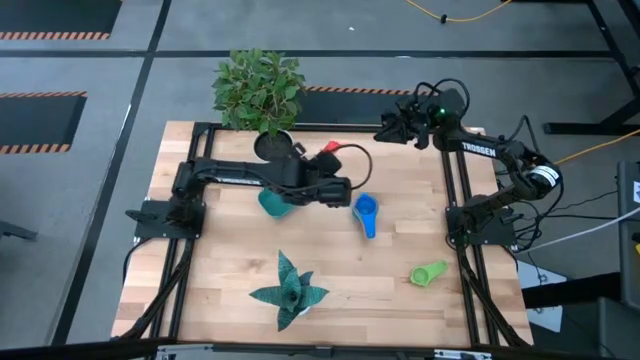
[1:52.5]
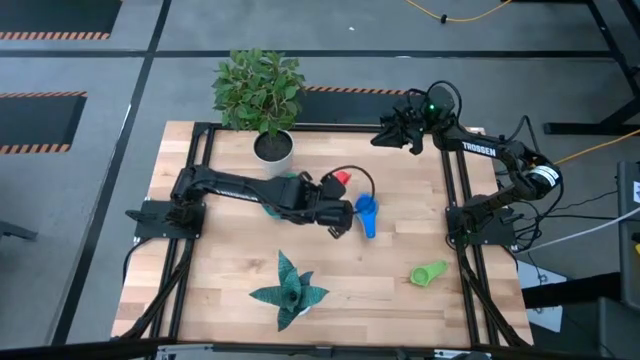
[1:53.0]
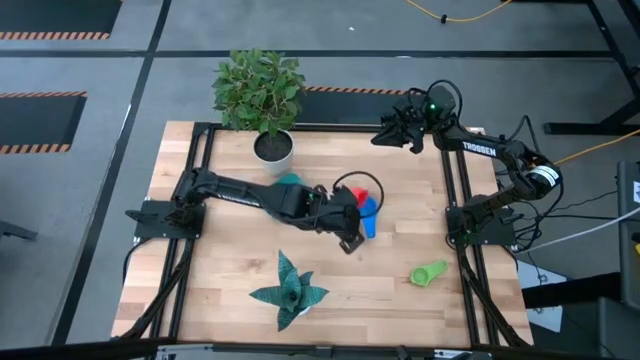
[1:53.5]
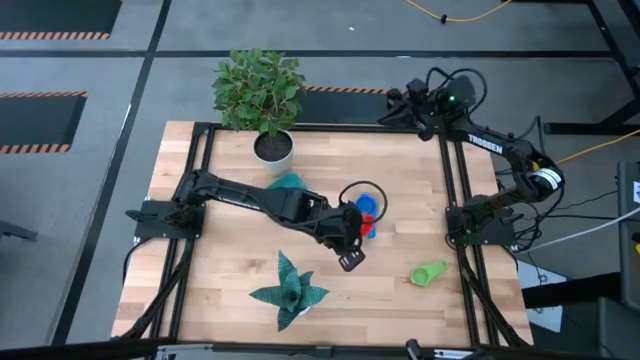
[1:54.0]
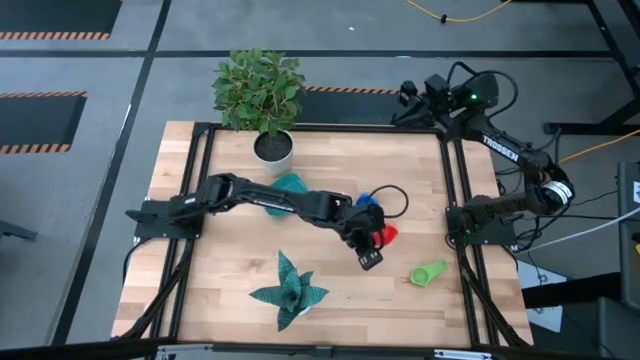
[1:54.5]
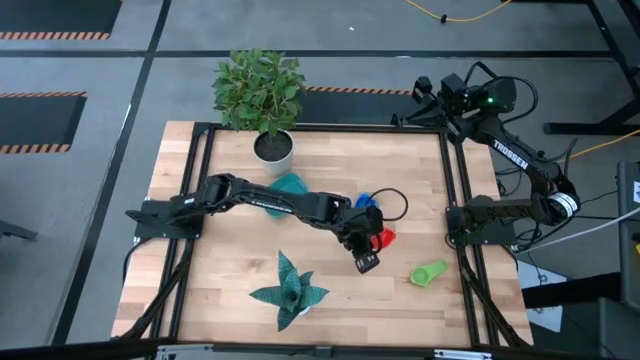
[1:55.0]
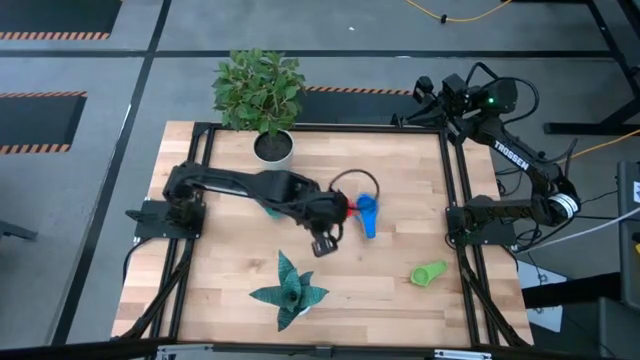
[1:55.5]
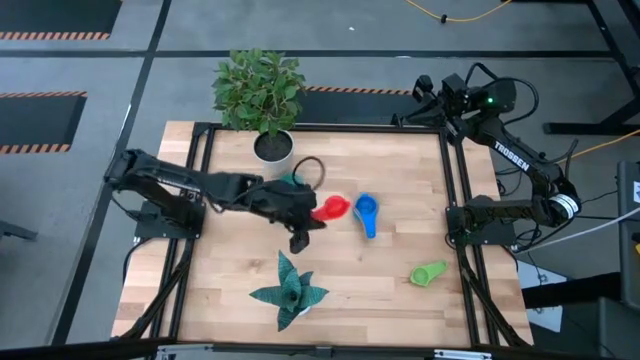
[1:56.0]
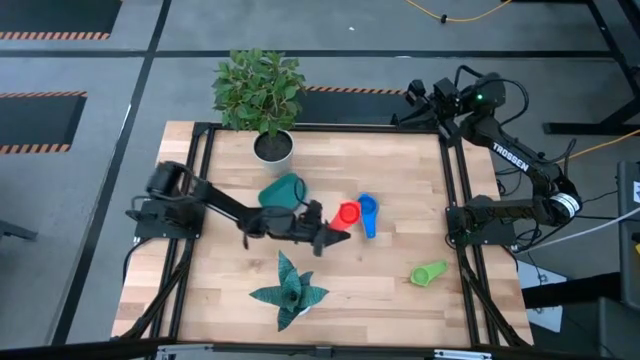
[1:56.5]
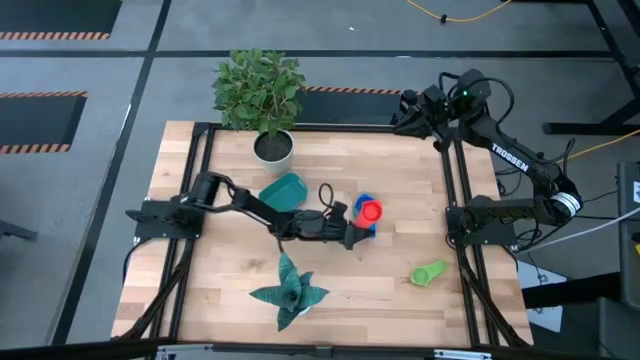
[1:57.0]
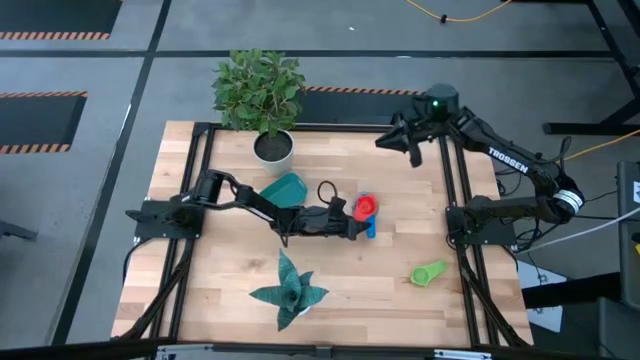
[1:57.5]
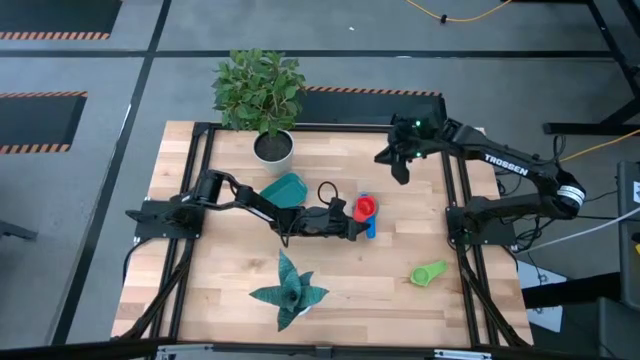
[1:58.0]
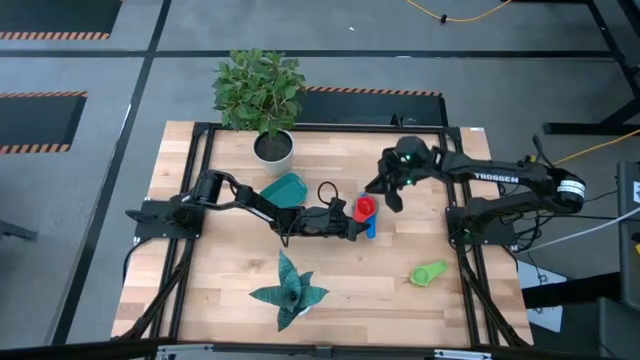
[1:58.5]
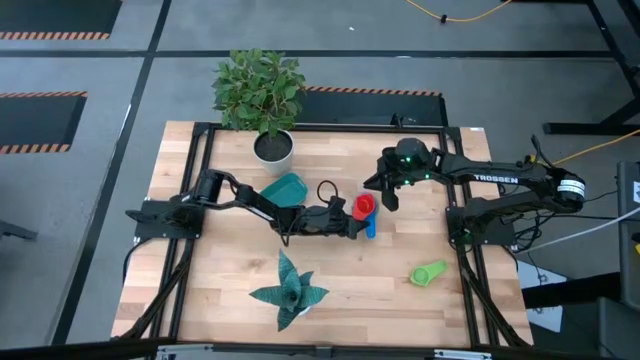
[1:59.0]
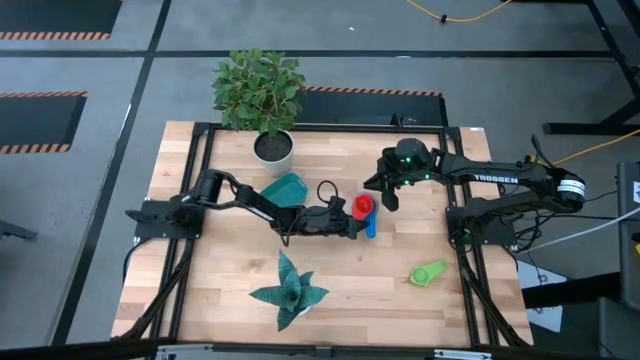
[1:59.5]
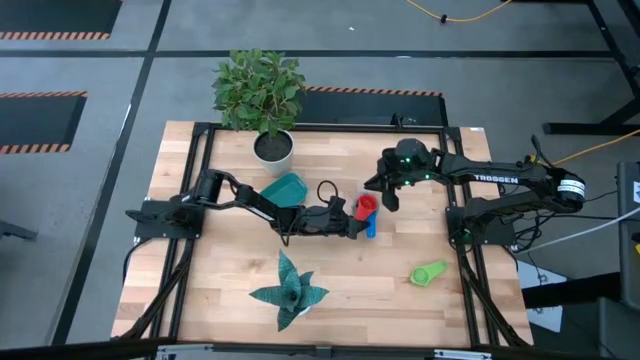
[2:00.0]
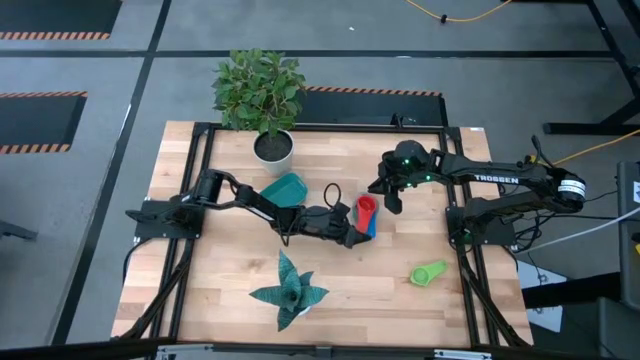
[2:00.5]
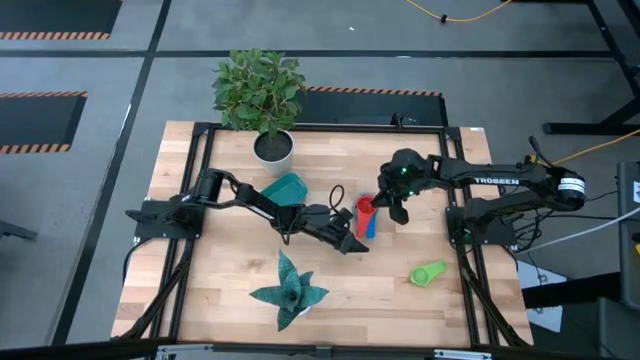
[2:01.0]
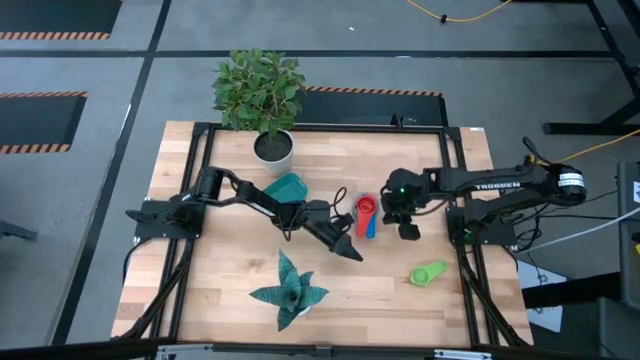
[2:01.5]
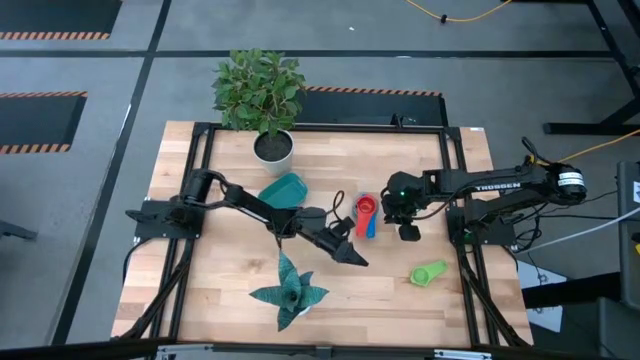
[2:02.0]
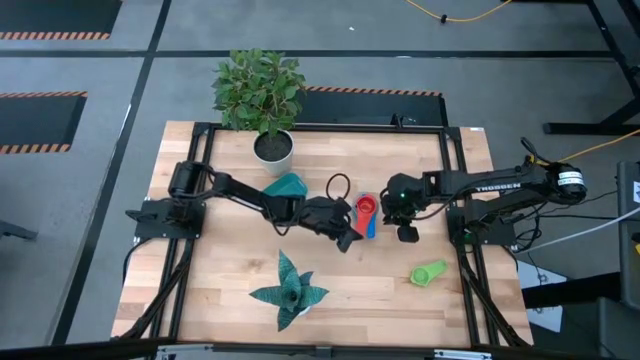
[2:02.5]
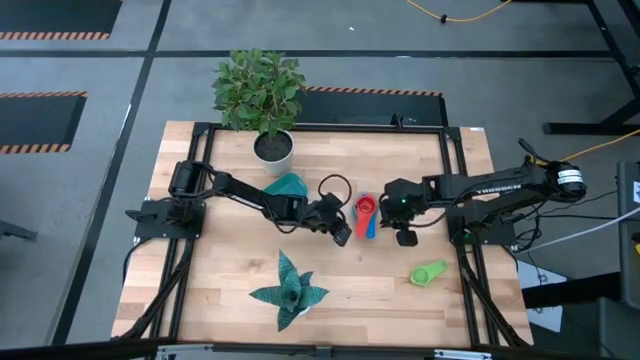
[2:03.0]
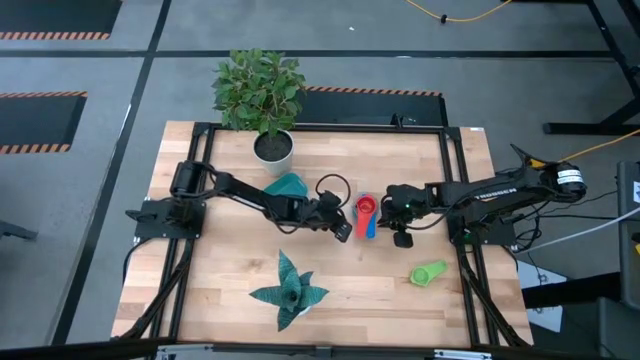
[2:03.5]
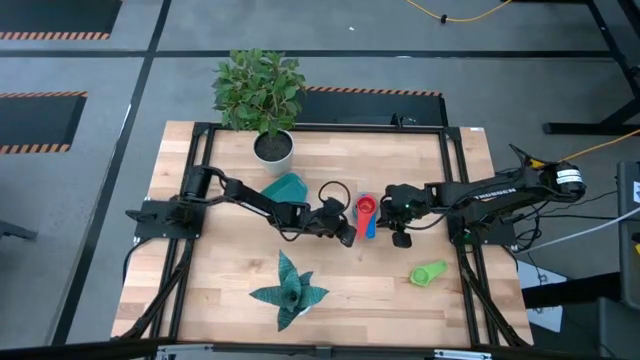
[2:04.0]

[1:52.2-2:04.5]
Task: Nest measuring cups in basket
Stack the red measuring cup on top of the blue measuring cup

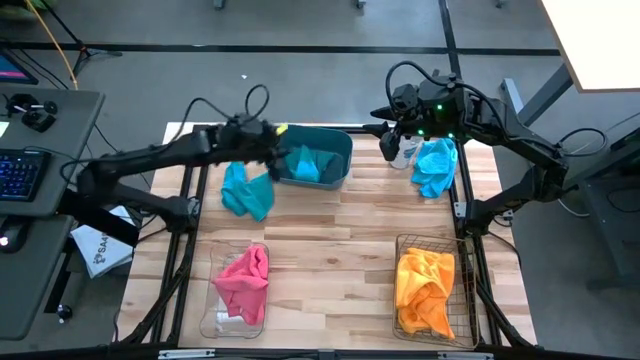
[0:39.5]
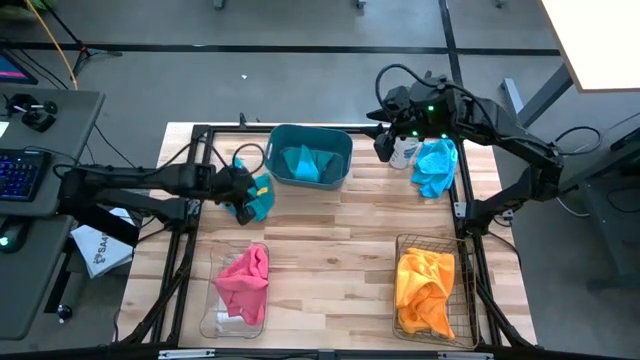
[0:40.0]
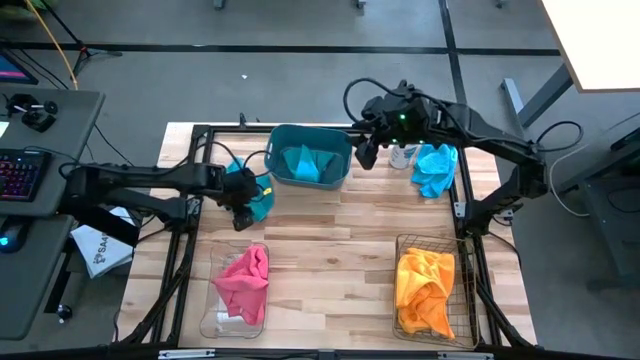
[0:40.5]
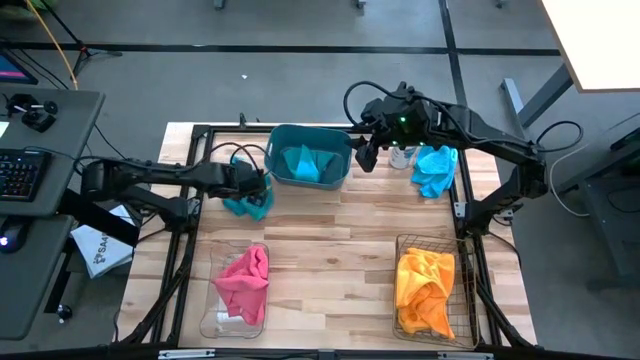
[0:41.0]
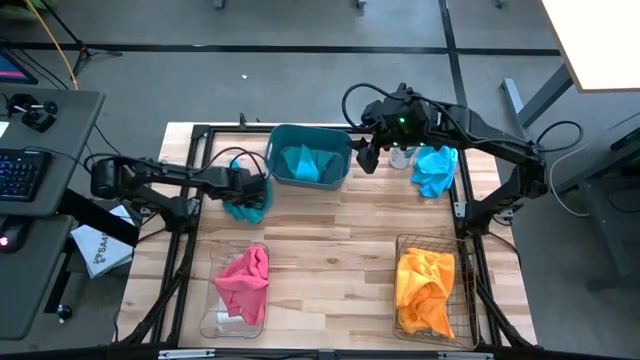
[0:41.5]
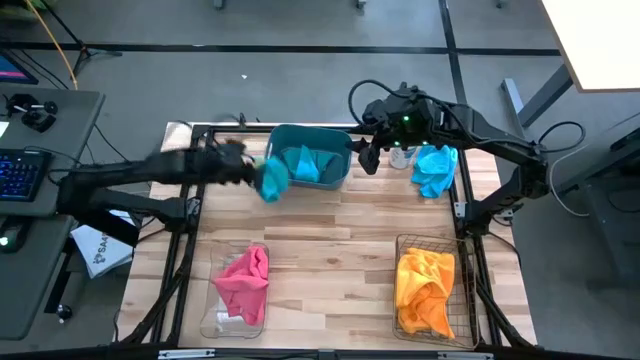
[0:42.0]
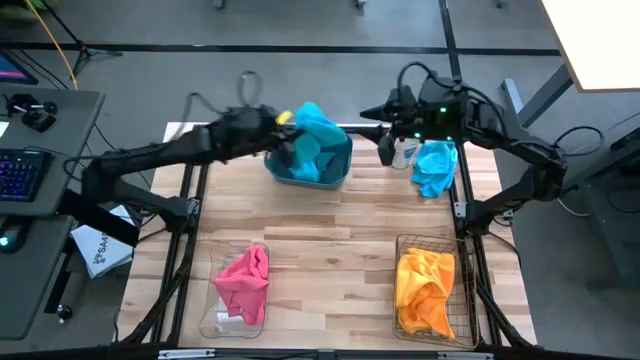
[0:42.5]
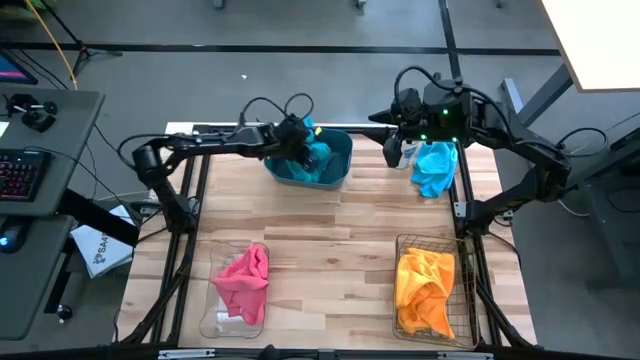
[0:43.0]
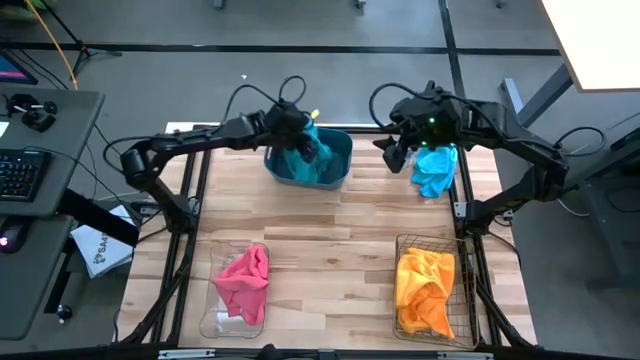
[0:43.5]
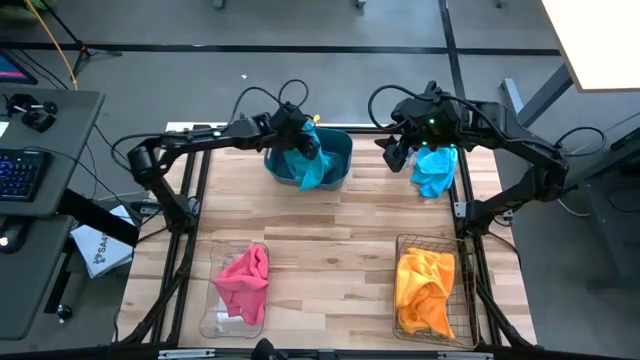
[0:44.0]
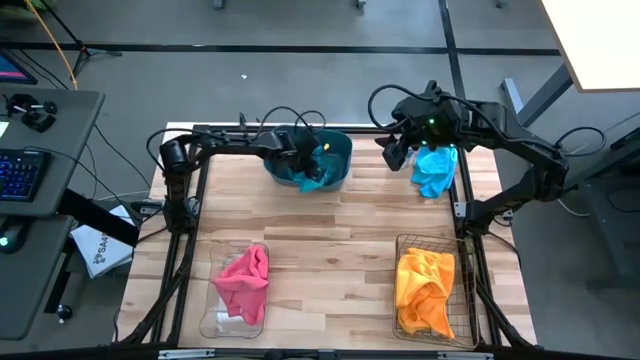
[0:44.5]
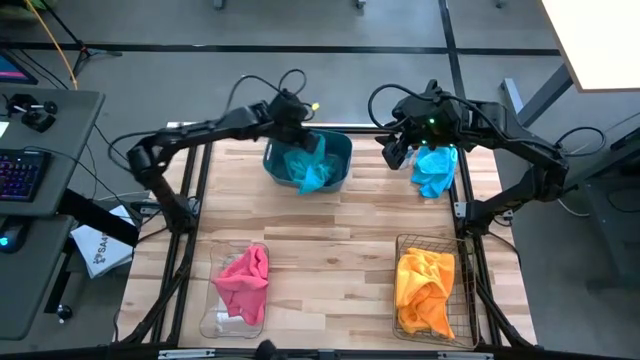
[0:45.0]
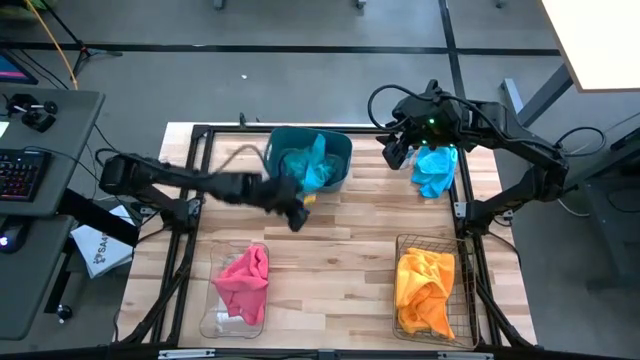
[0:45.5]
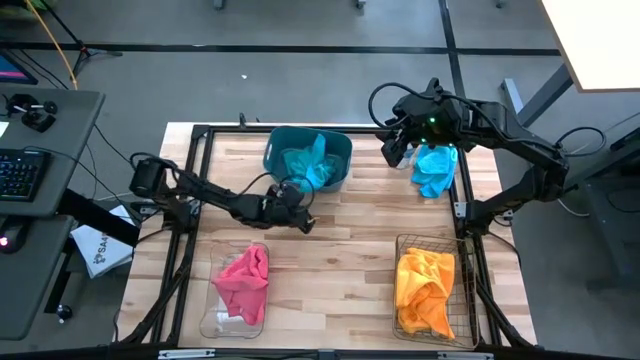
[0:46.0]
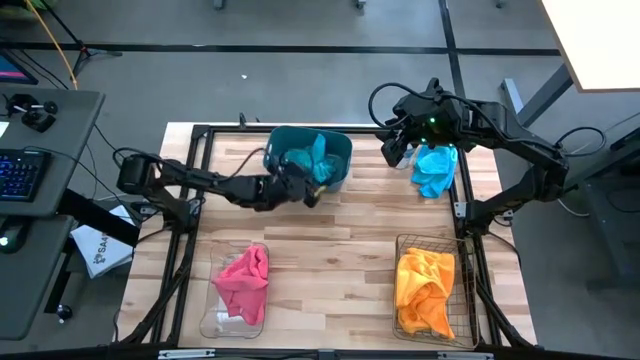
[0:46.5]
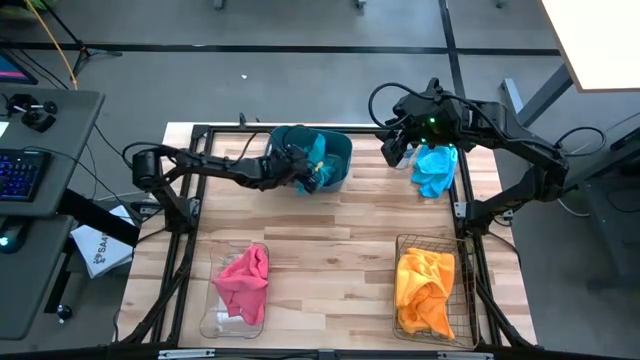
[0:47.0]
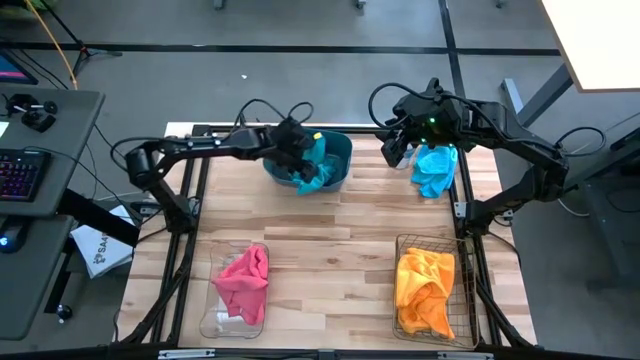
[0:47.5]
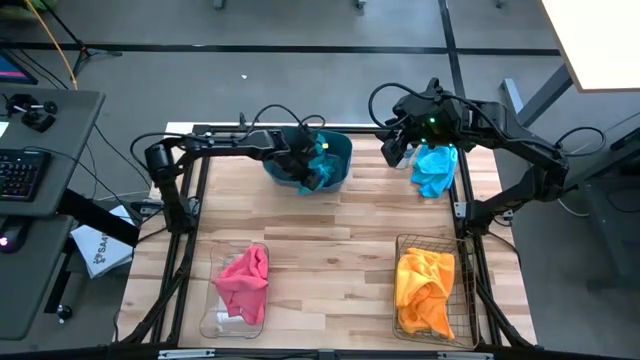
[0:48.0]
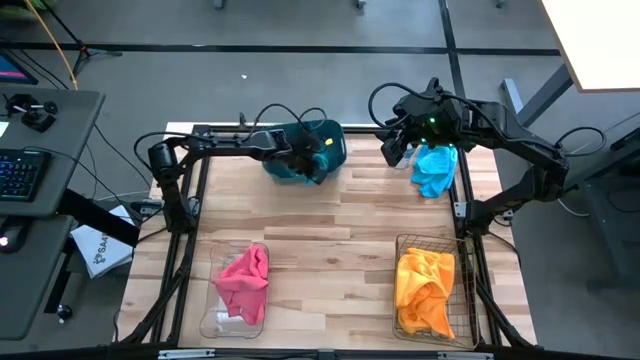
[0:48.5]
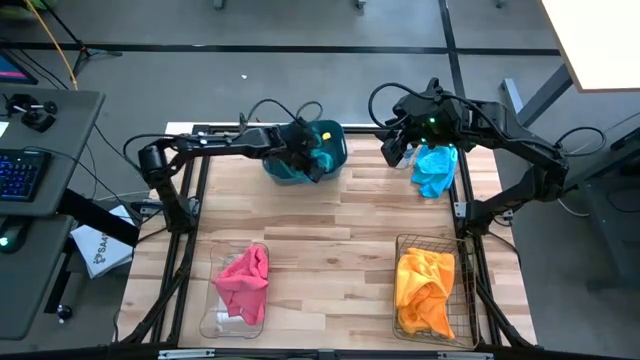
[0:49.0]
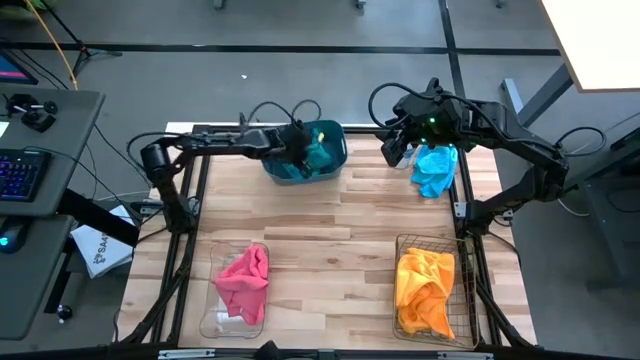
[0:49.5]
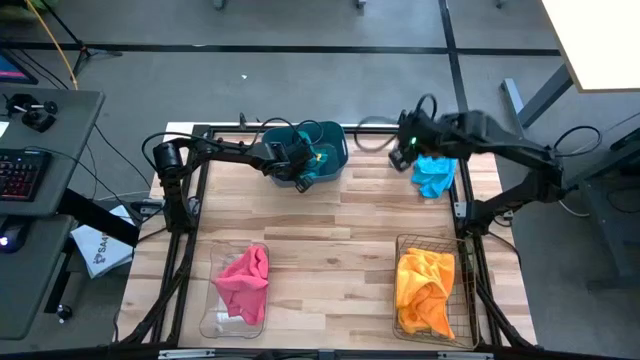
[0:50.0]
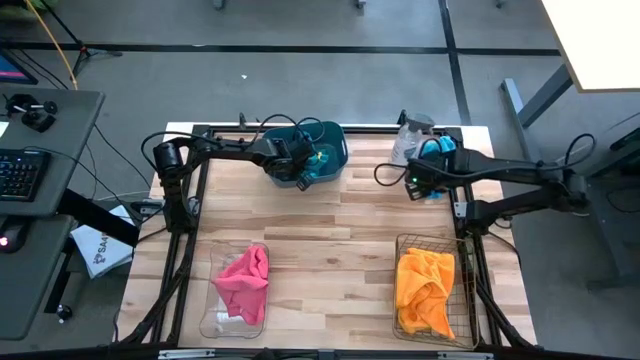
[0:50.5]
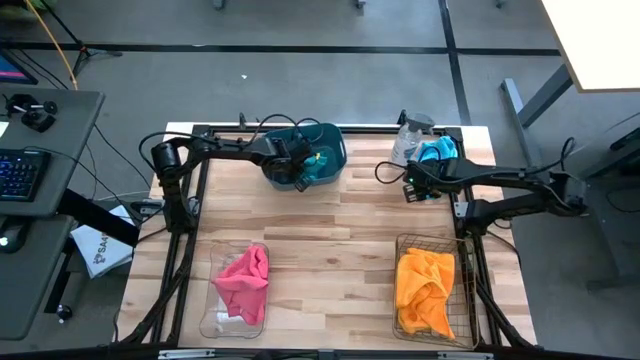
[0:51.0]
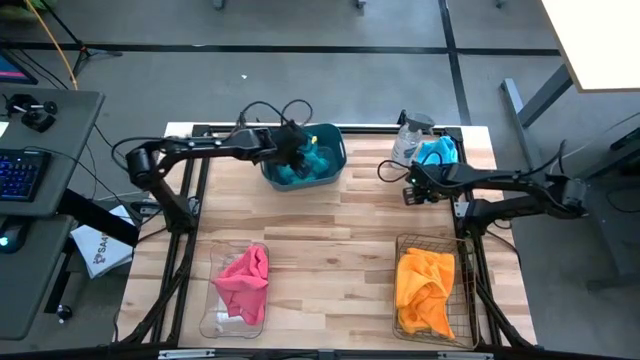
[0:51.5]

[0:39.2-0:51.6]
Task: Sort microfiber towel by color & place in baskets
Put the left blue microfiber towel into the blue bin
